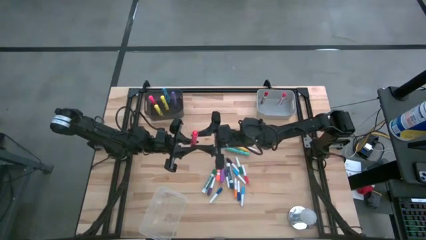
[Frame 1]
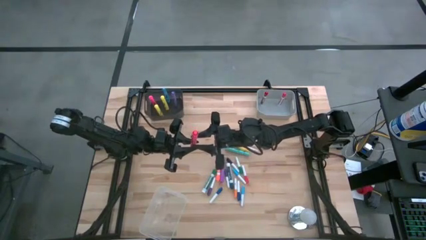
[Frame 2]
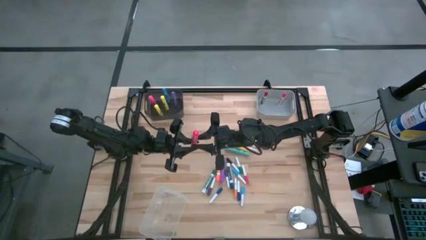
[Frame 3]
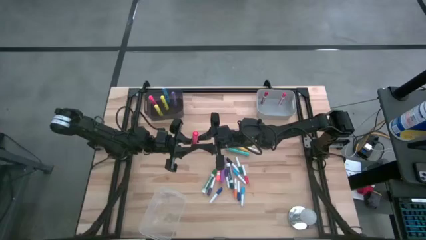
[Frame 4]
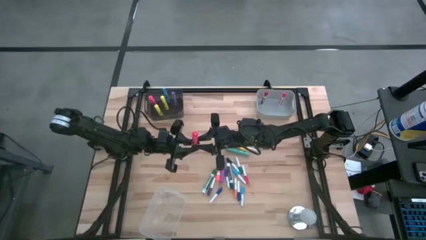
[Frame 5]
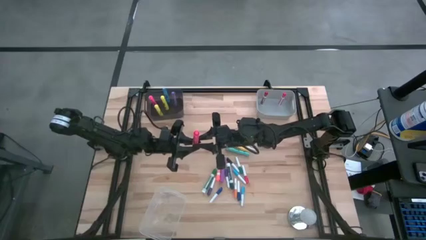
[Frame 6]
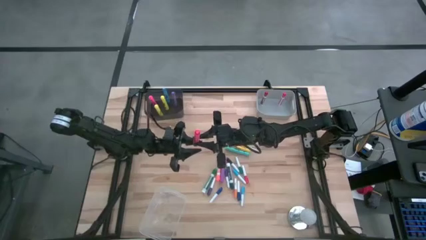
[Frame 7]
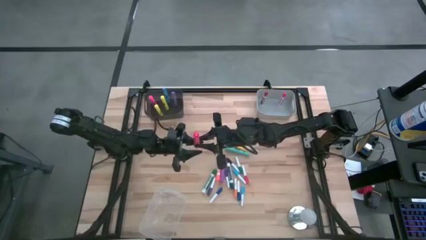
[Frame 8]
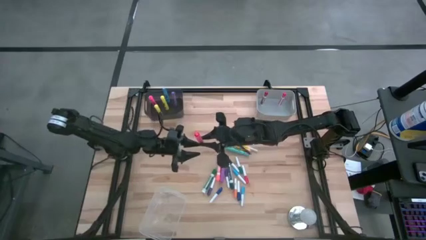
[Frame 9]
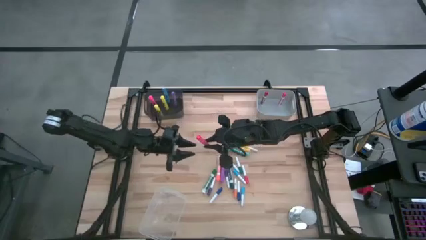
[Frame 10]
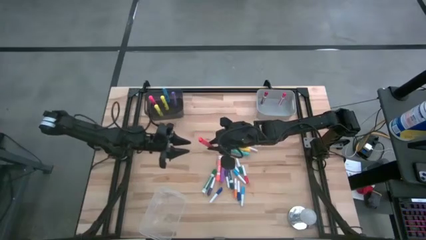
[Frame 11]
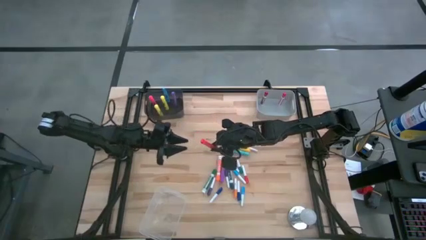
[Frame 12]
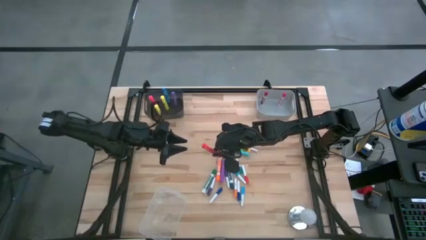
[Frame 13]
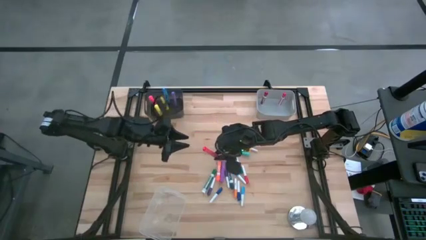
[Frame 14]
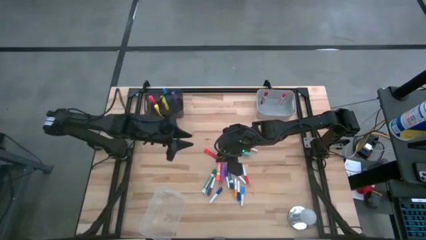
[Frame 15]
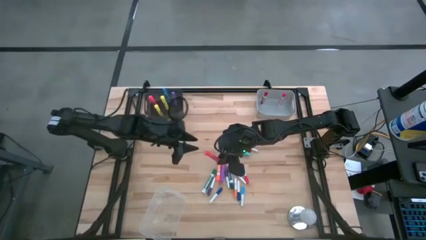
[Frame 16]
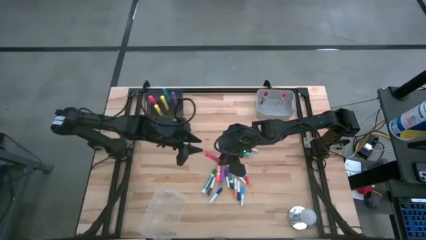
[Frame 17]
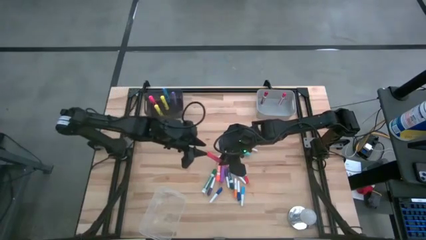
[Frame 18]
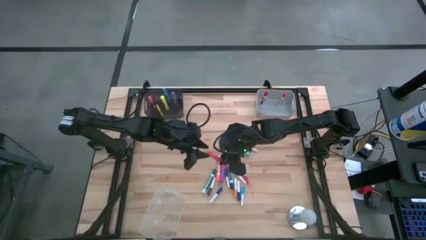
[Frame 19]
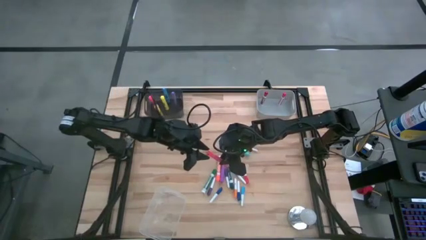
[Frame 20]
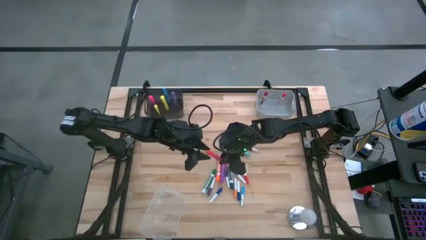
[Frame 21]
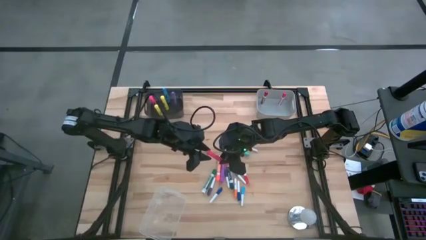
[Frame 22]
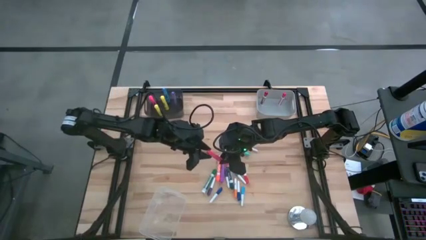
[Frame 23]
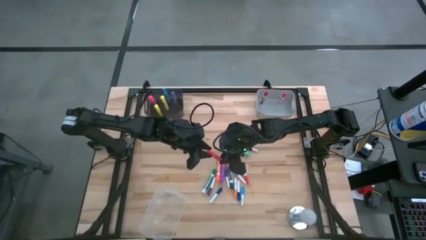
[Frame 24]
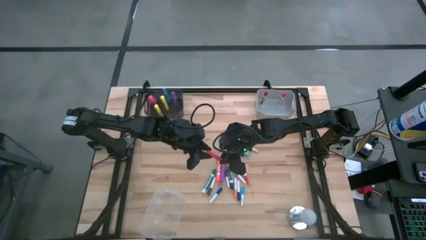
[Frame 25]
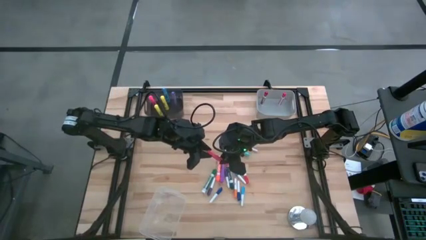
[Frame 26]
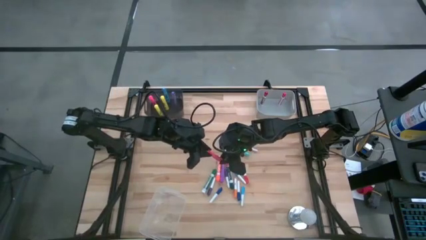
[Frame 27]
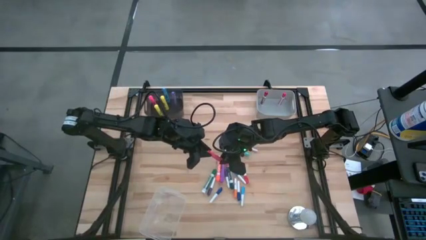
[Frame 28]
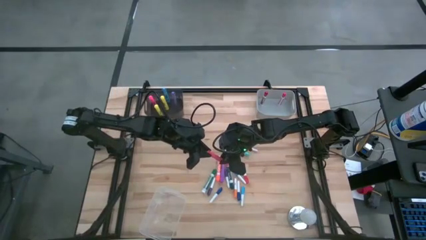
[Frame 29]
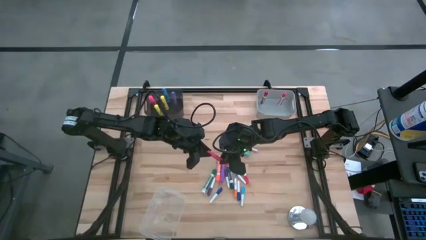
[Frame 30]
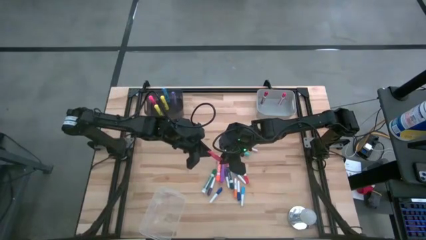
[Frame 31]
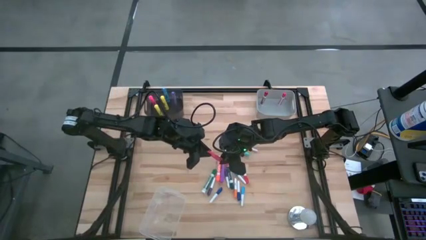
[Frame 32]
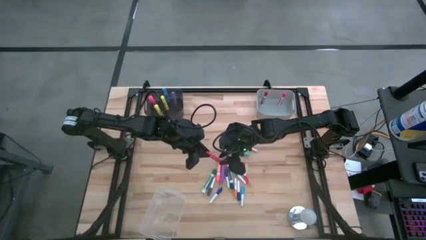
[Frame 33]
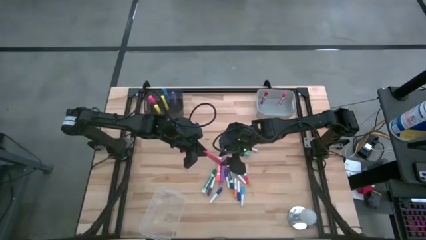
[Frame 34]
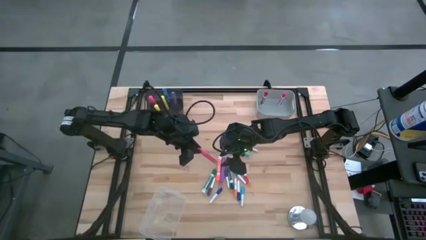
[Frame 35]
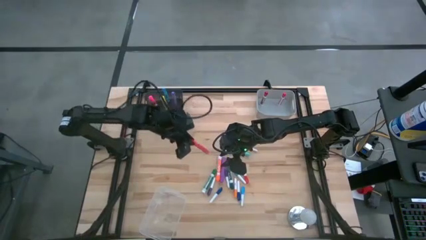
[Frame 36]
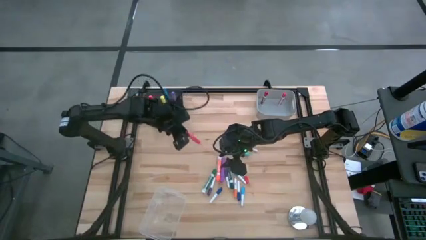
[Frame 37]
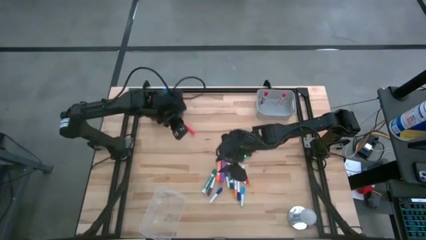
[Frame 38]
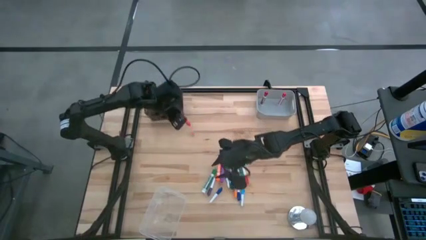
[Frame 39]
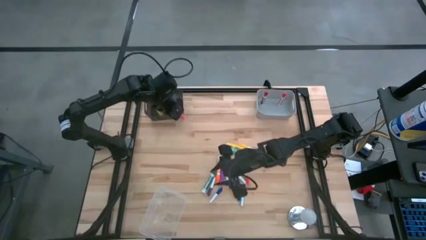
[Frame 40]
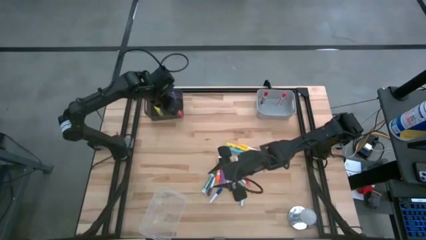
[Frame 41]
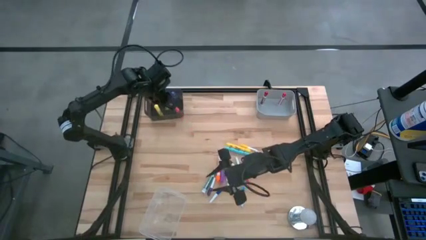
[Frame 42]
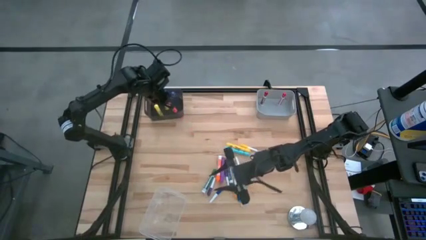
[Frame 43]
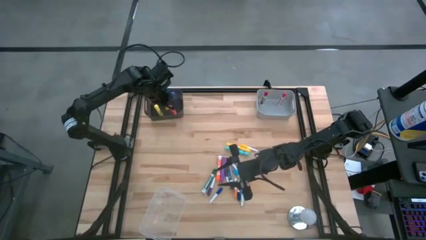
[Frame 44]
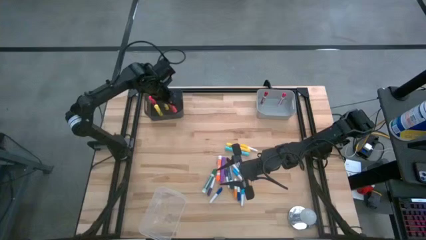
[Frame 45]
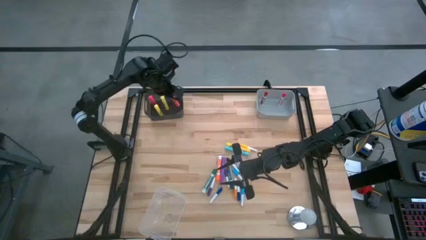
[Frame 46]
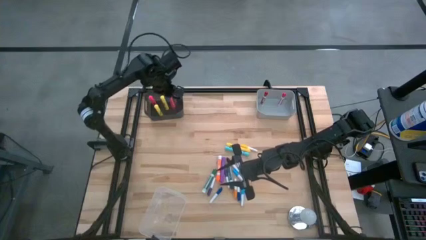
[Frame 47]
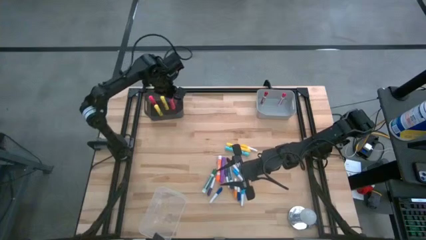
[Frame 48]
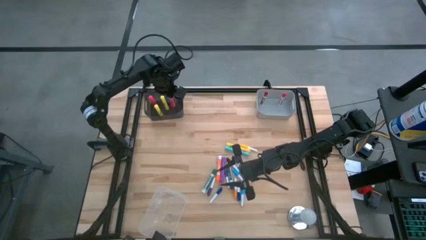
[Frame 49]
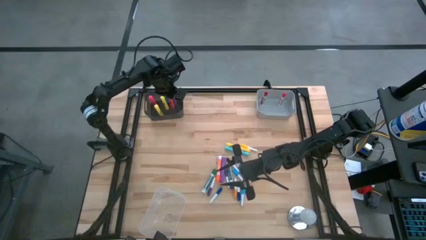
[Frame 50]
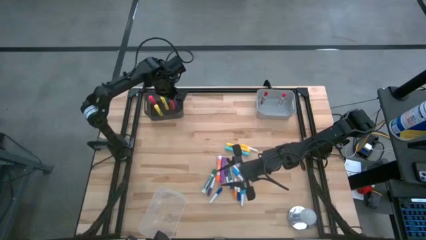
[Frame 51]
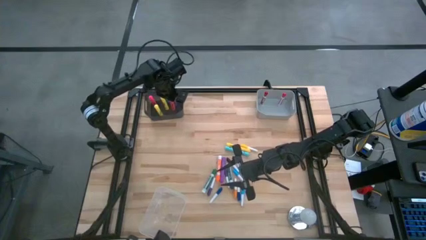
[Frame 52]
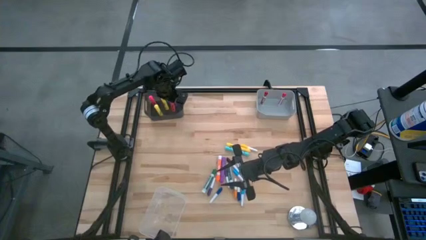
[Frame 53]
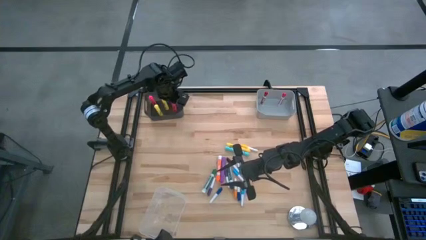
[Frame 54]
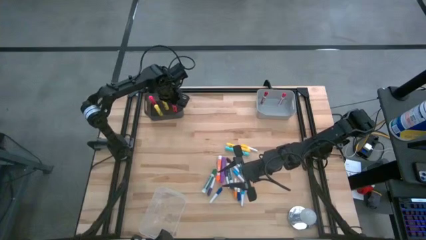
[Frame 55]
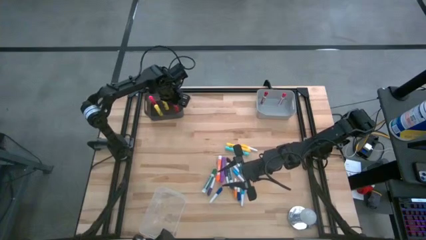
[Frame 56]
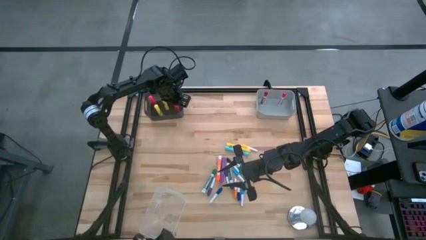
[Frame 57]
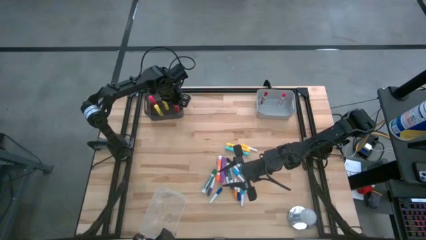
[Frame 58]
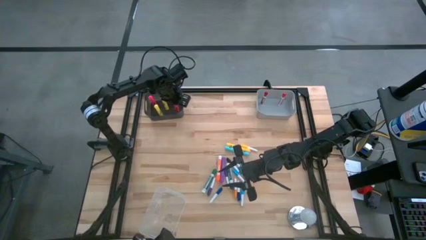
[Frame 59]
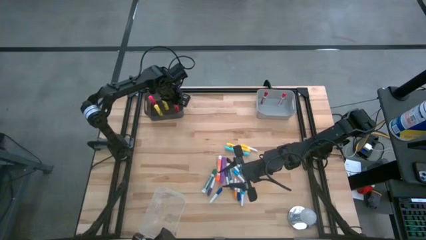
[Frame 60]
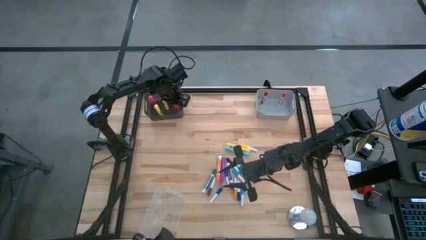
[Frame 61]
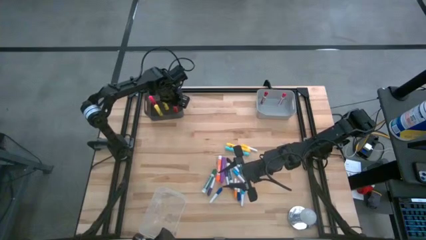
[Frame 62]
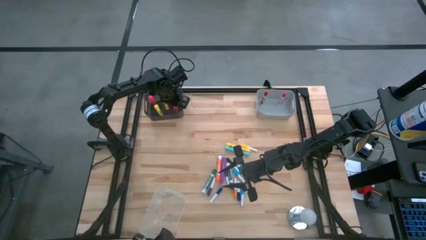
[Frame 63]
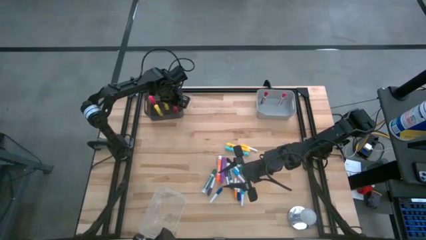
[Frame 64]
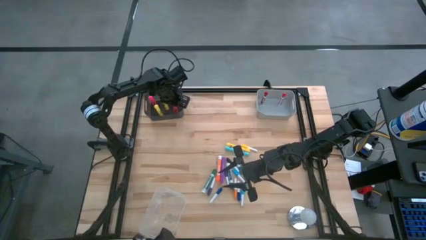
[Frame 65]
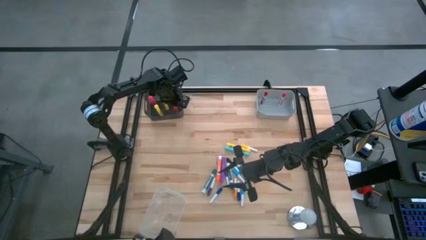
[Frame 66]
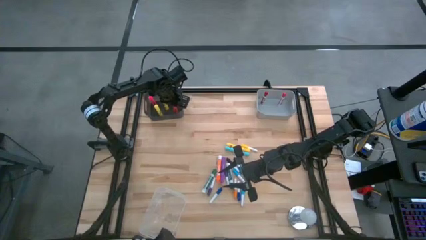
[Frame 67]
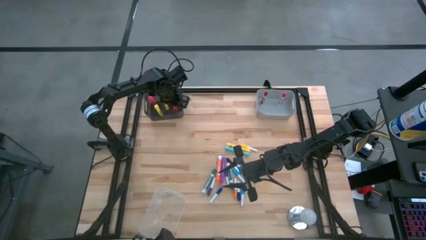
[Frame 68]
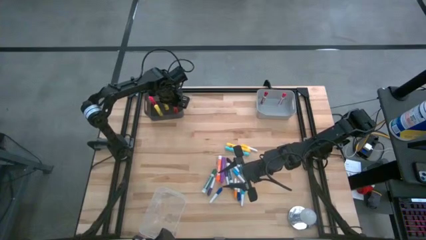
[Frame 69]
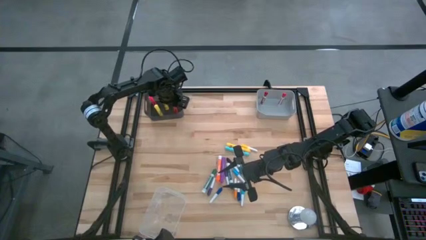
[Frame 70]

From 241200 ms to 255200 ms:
Task: Pick & Place Markers
Put the red highlighter pen into the black bin

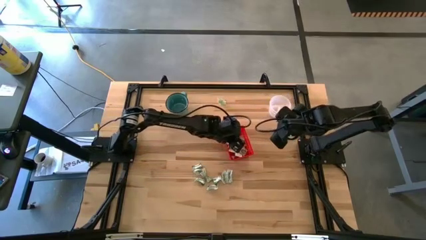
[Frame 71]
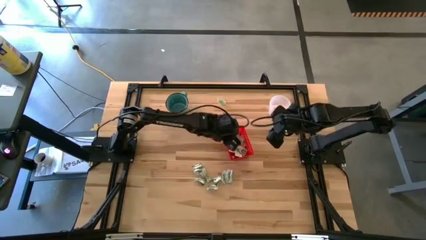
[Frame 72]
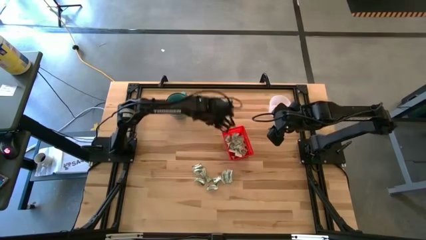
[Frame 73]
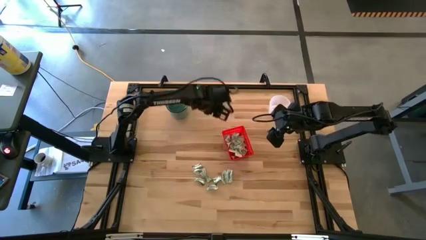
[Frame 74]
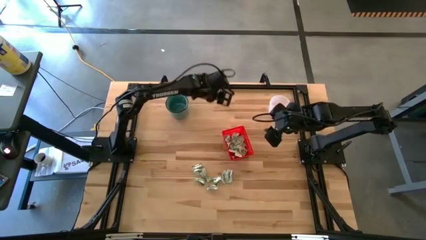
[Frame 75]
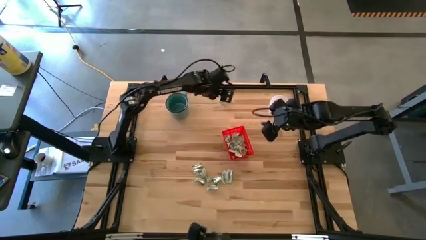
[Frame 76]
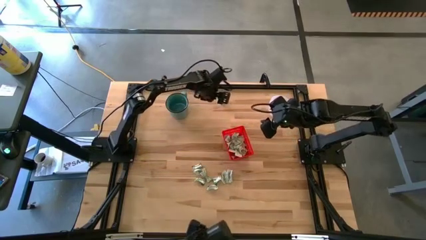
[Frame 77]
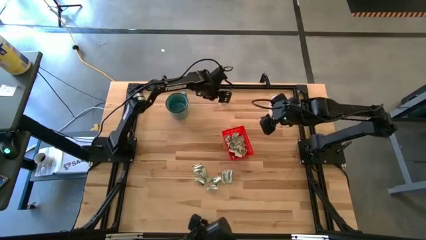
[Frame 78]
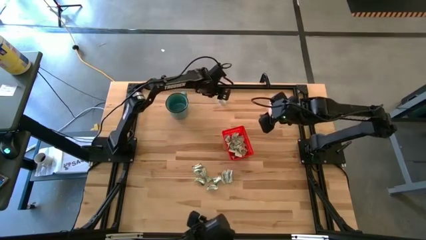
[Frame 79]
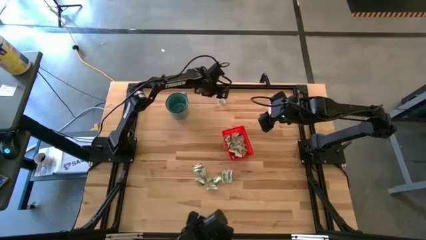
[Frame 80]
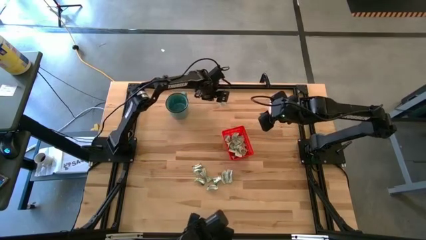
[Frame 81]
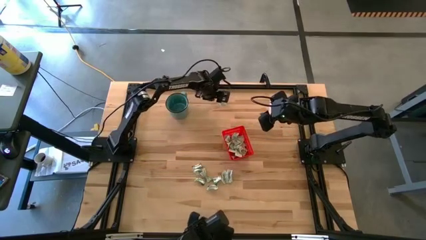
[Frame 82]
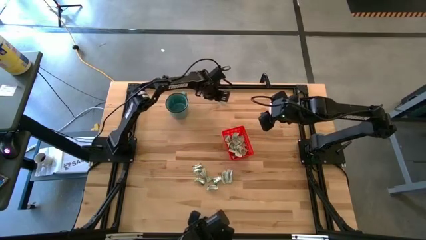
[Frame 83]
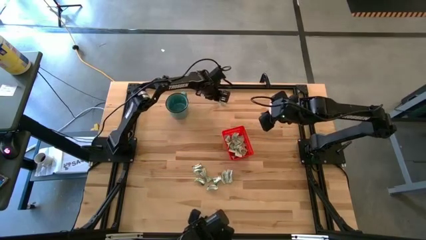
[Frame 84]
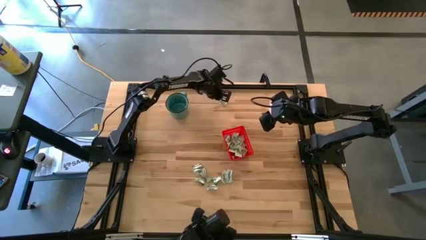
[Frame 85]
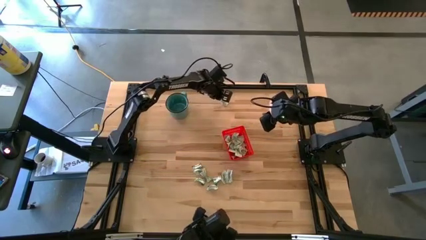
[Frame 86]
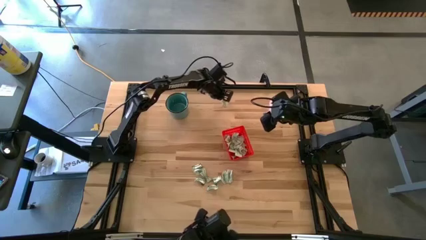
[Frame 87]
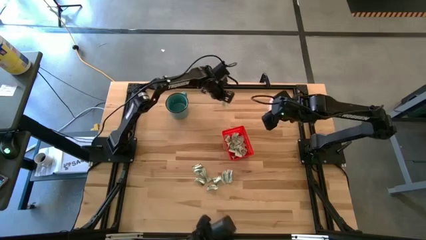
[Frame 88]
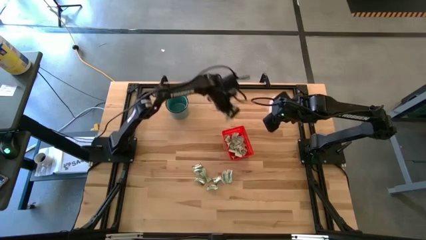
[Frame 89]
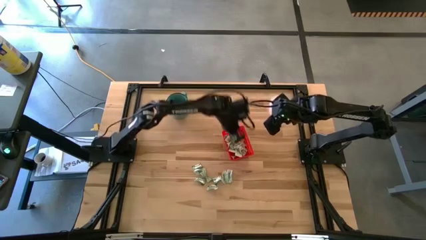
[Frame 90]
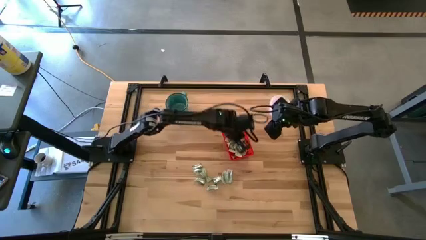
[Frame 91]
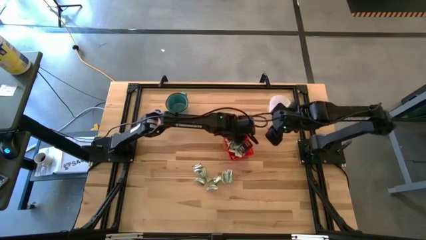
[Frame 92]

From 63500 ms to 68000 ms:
Task: Pick and place items into bin
Put the stevia packet into the orange bin
